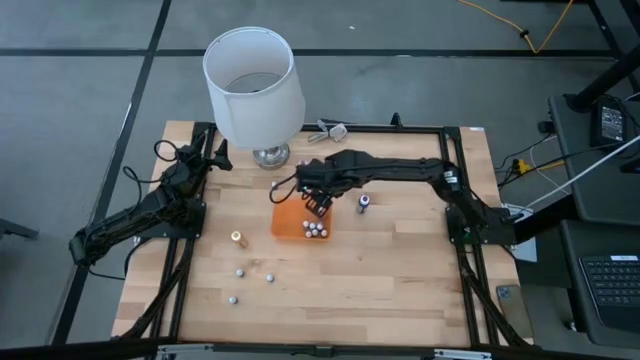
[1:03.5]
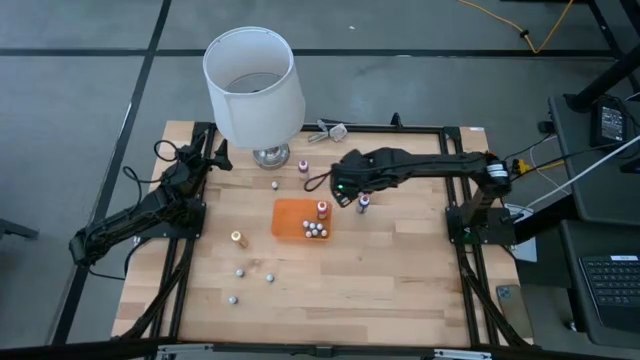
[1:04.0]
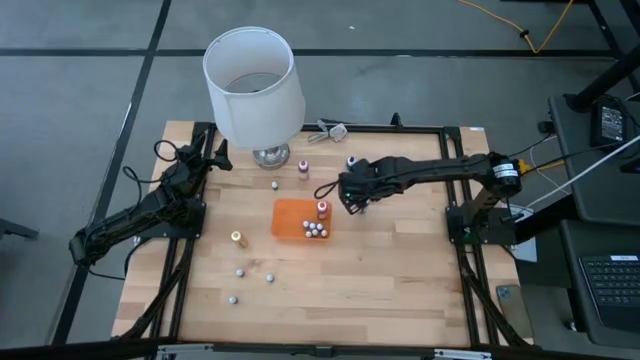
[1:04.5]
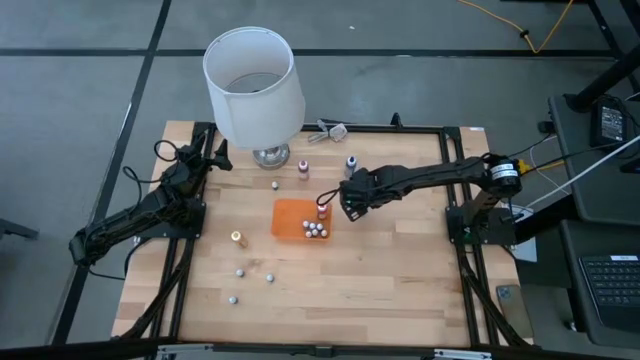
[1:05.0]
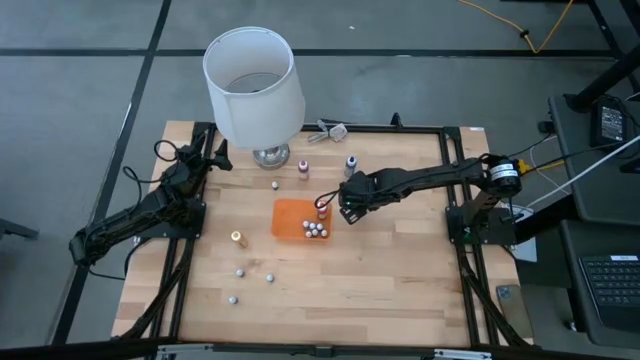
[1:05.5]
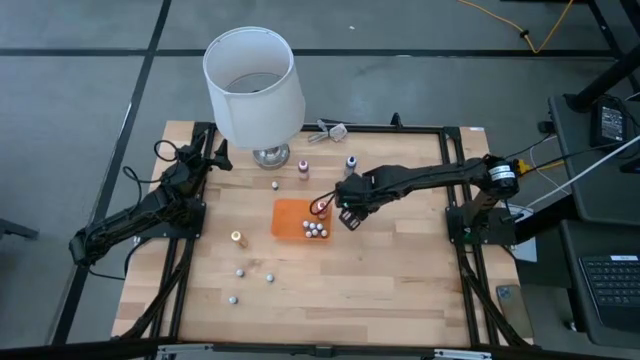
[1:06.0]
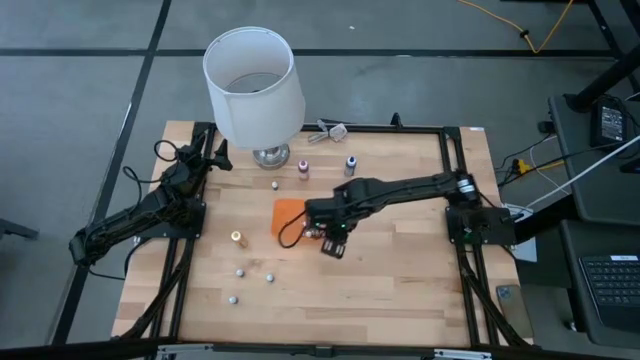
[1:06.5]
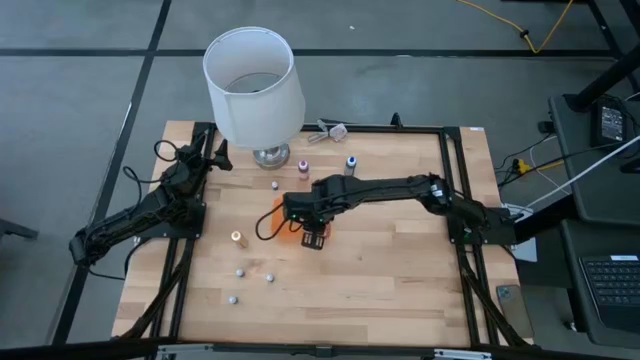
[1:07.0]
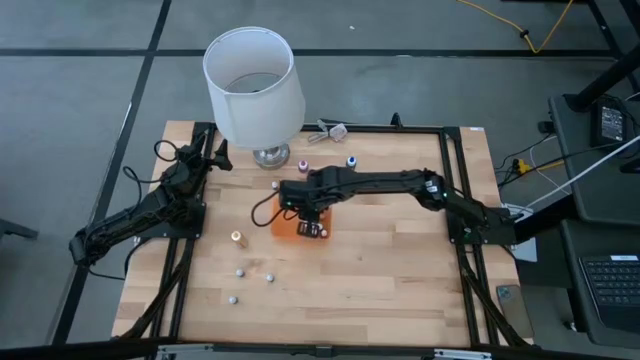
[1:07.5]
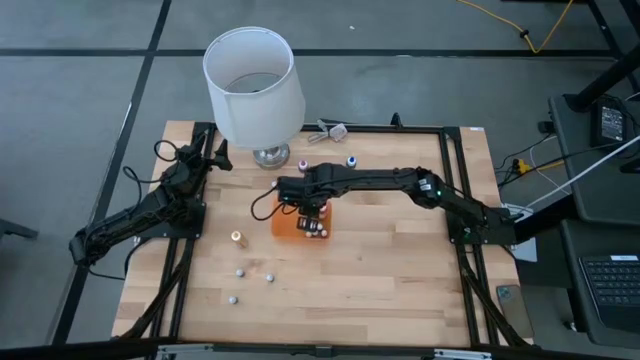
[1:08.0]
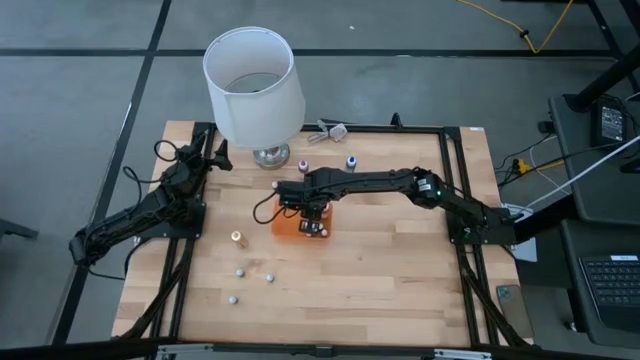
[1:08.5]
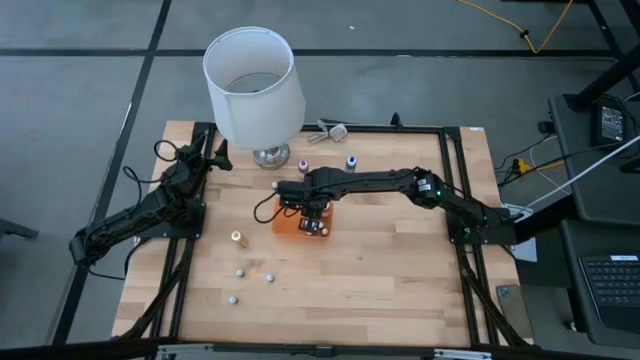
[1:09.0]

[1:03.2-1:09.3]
Task: Pick & Place food coloring
Put the big purple food coloring bottle into the orange bin

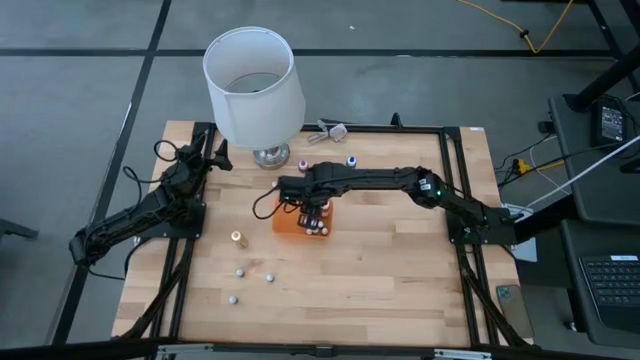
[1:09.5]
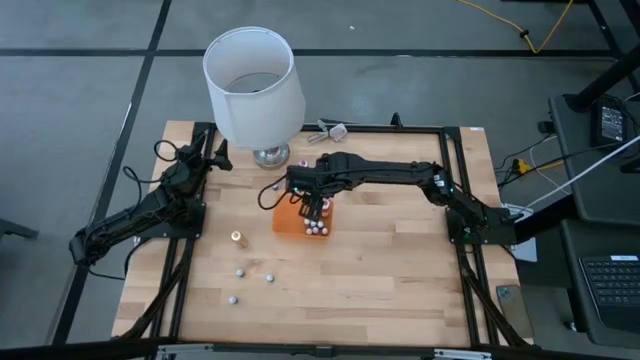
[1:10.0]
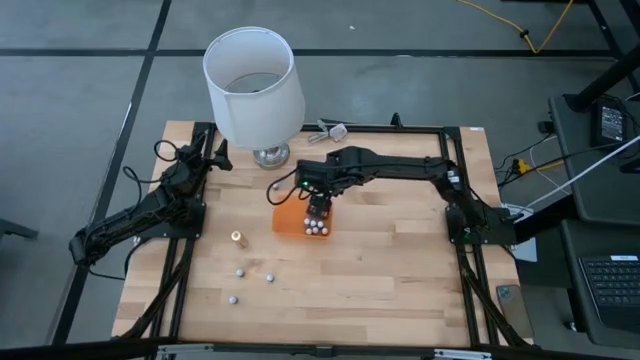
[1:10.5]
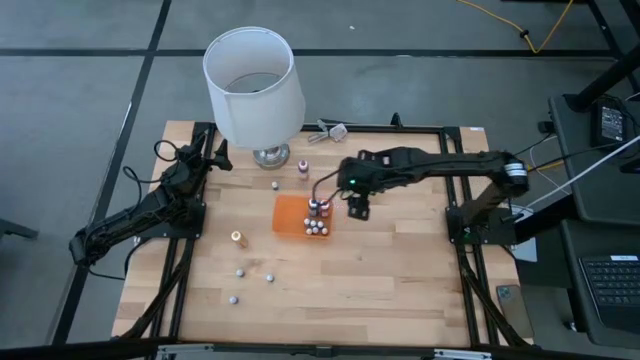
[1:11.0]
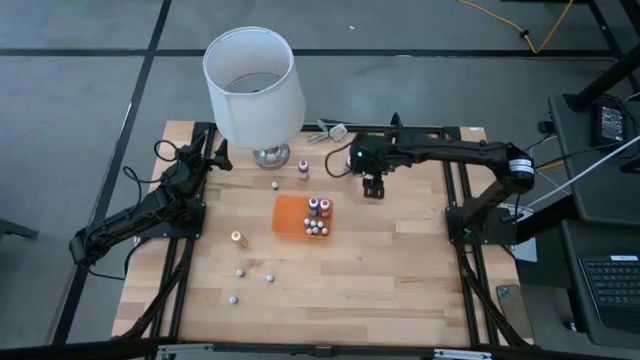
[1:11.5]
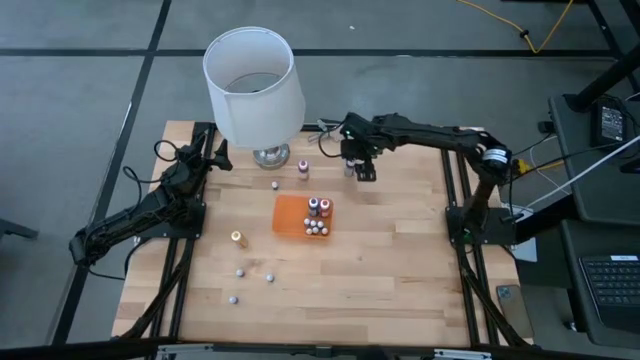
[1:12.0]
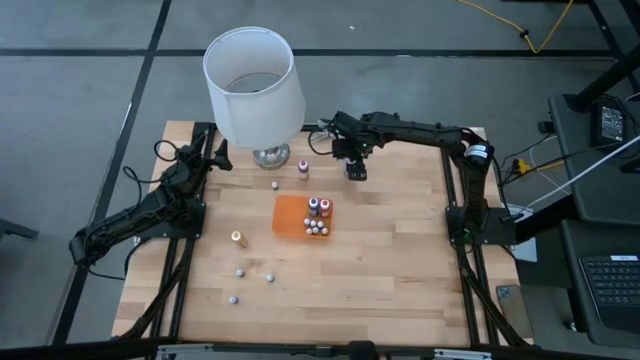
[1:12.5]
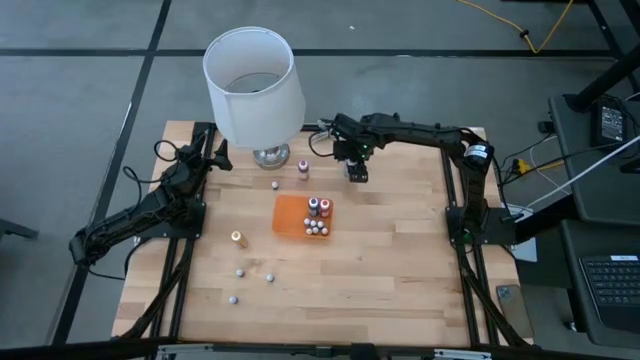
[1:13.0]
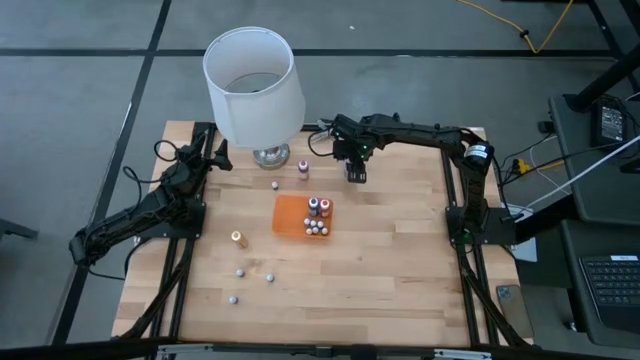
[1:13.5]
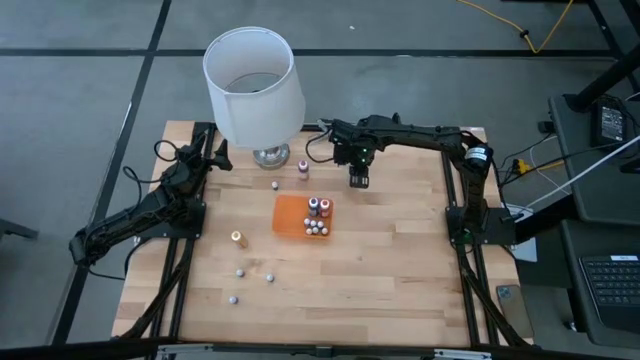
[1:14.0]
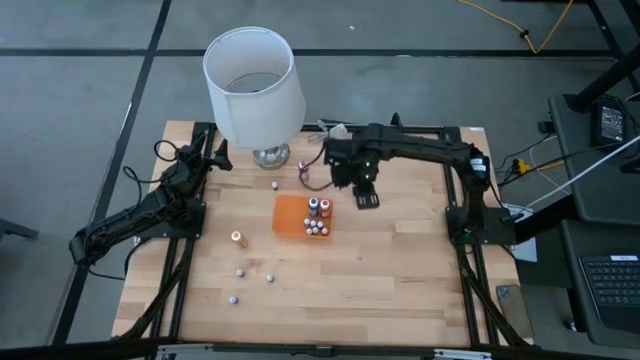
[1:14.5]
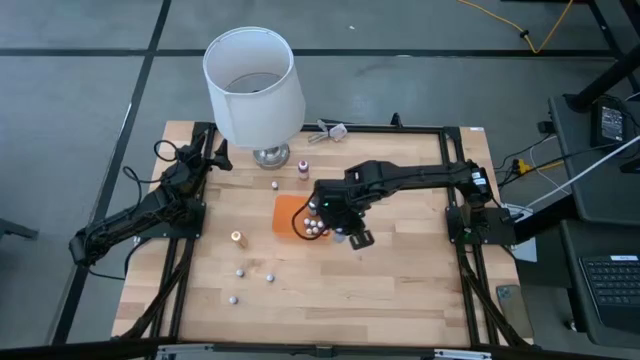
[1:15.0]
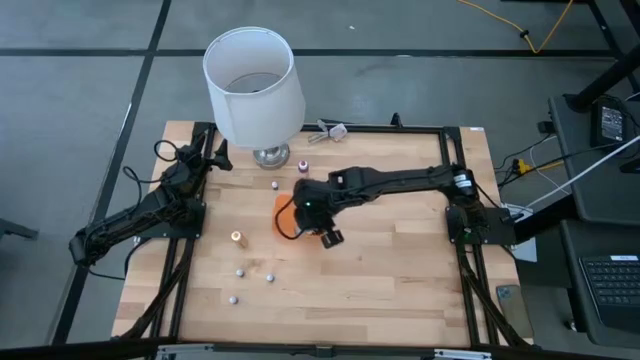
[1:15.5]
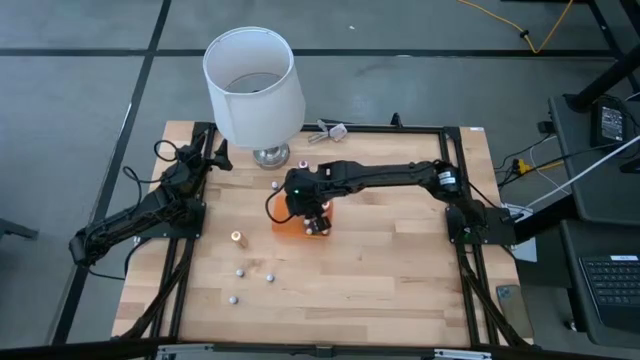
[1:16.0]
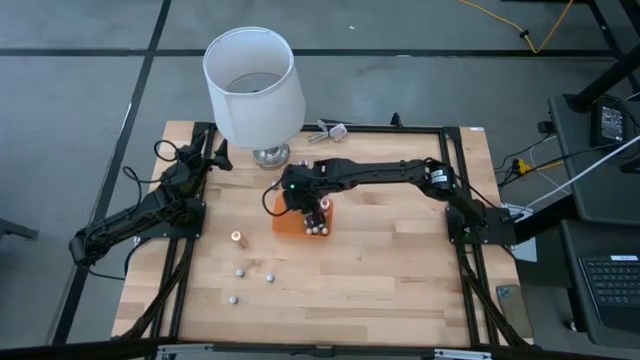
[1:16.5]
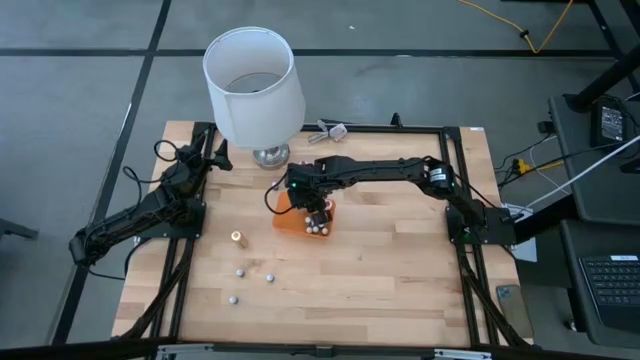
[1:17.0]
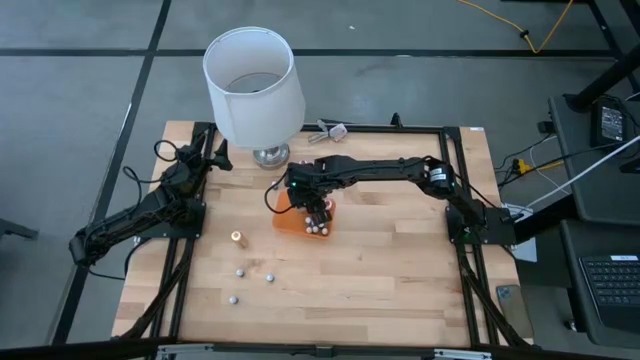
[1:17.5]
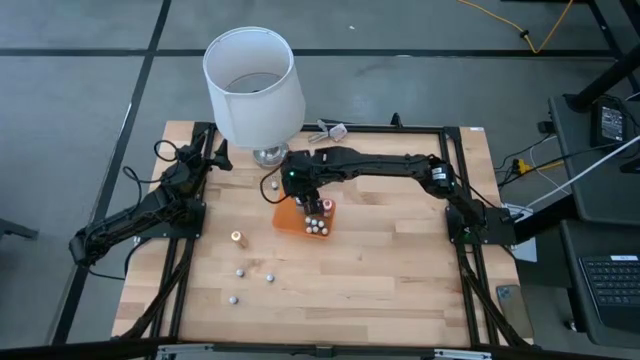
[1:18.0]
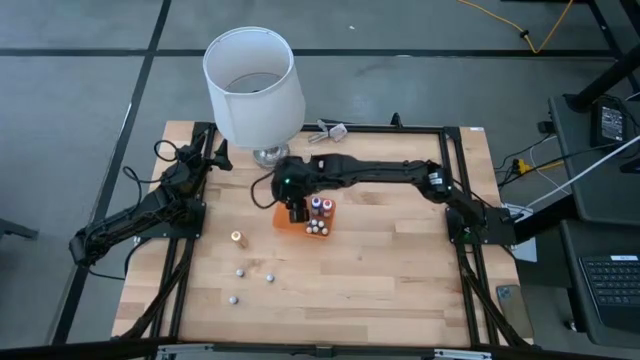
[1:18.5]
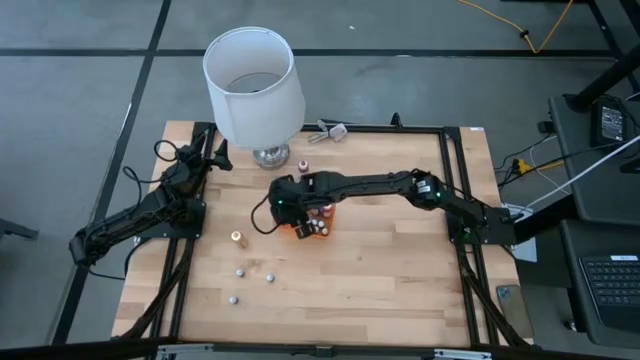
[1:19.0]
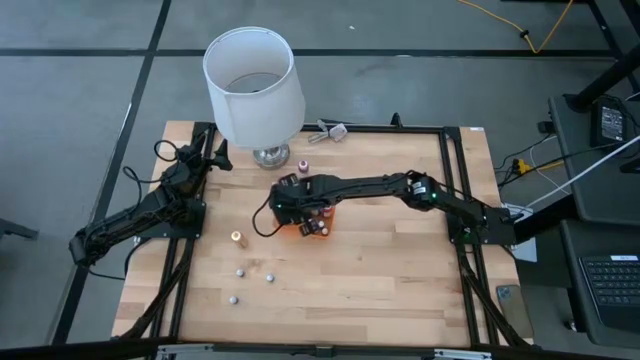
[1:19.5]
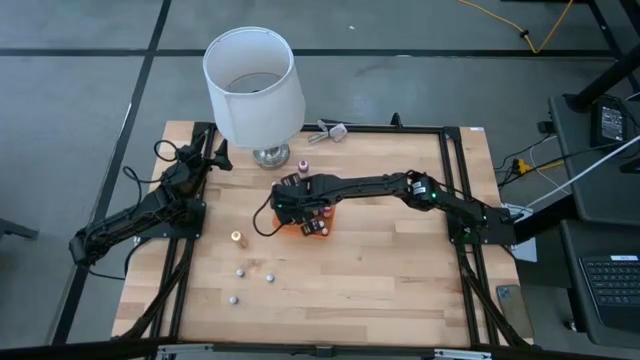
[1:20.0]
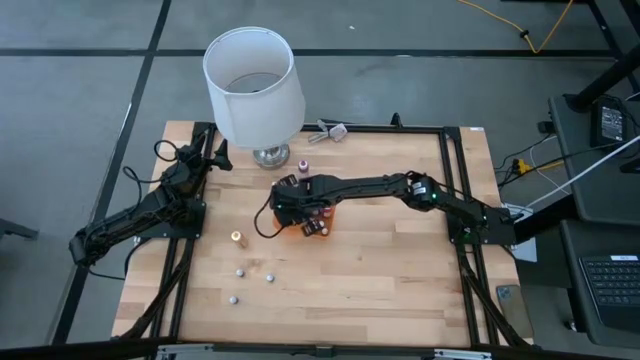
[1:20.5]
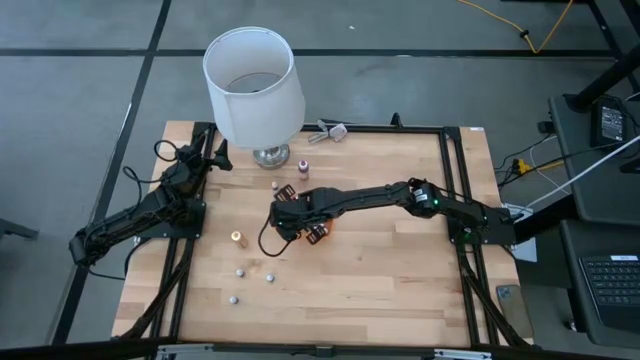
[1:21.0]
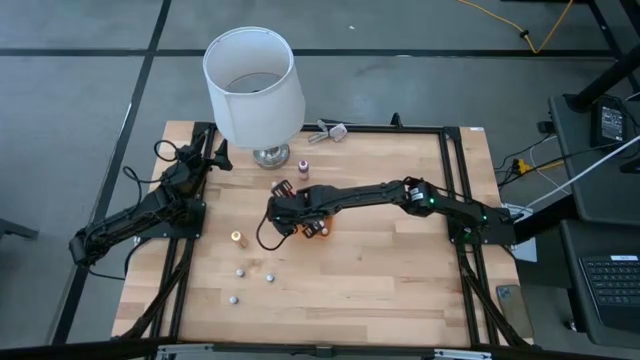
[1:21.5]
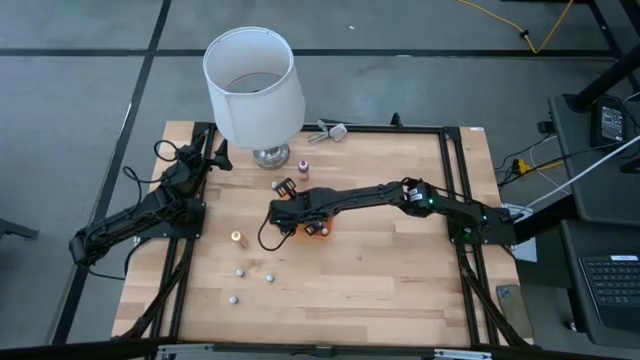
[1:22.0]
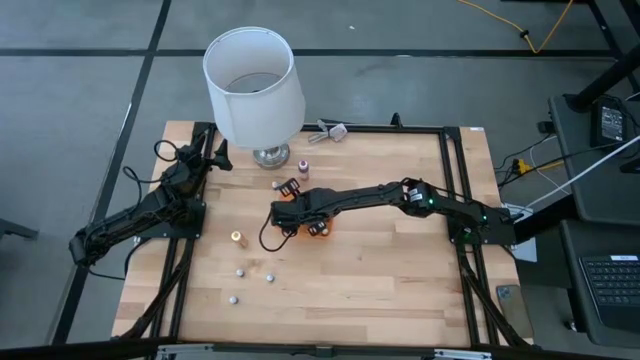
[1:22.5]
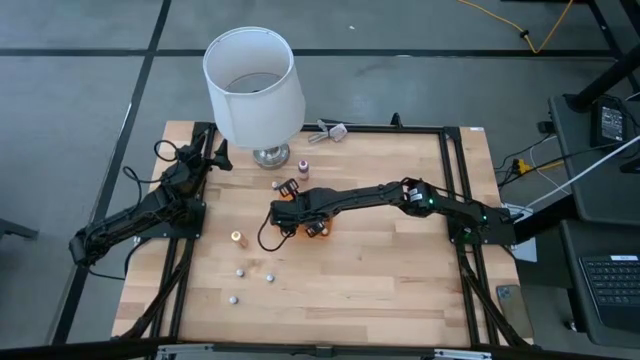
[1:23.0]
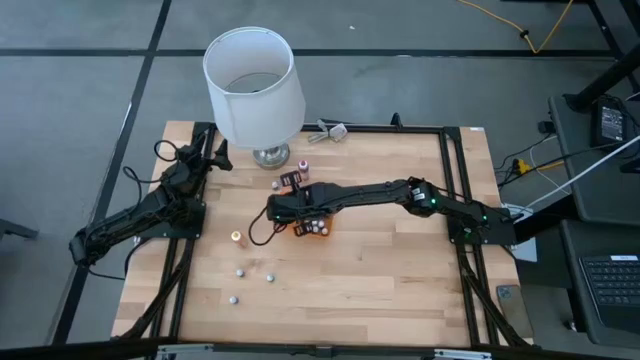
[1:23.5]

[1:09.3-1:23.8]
Put the big blue food coloring bottle into the orange bin

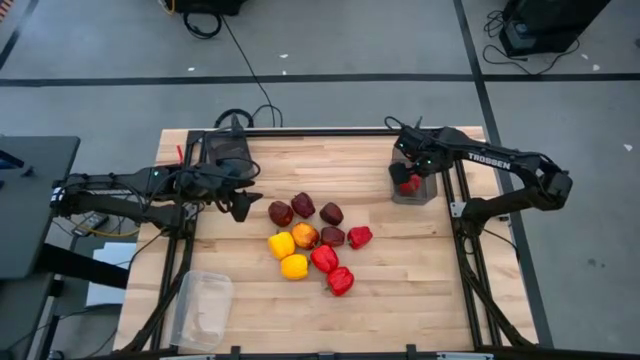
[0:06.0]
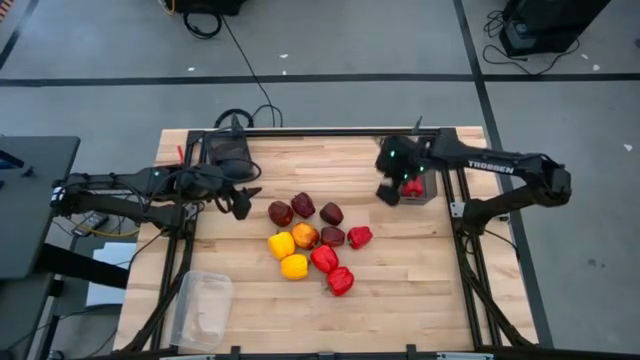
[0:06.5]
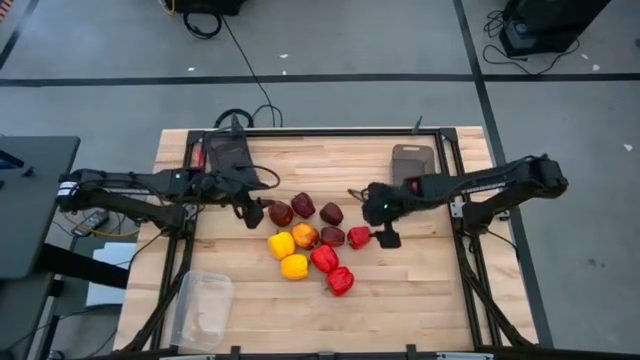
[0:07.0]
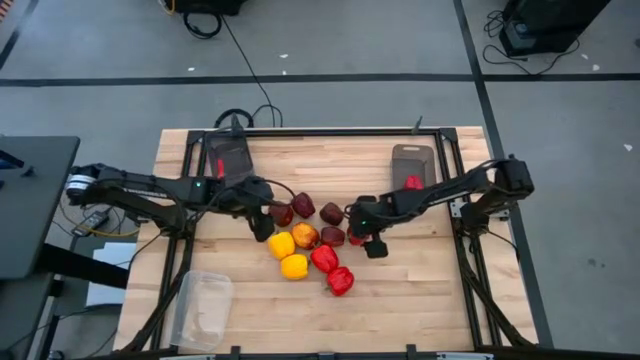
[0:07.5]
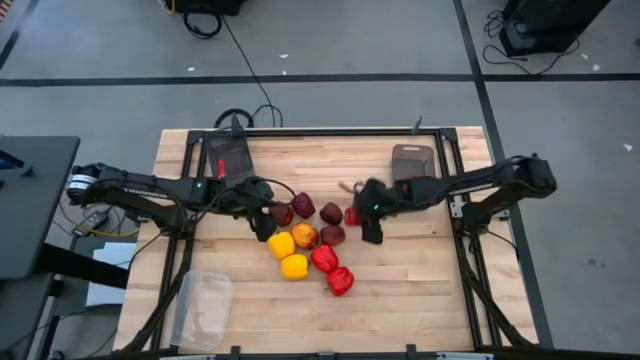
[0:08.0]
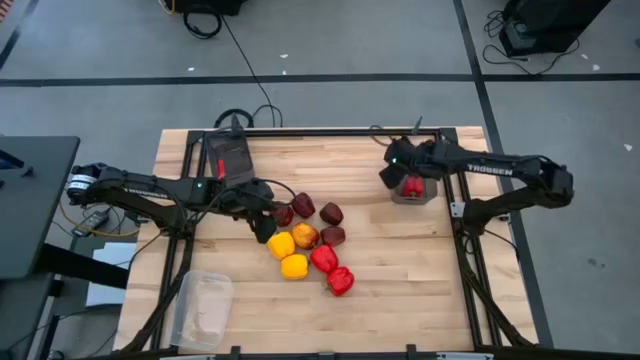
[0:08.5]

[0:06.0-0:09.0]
Task: Sort produce into baskets
Put the red bell pepper into the right black bin
